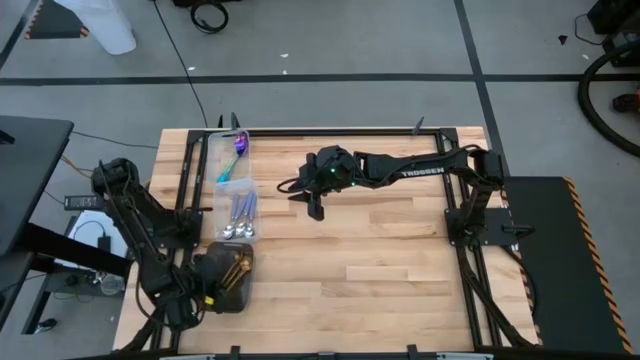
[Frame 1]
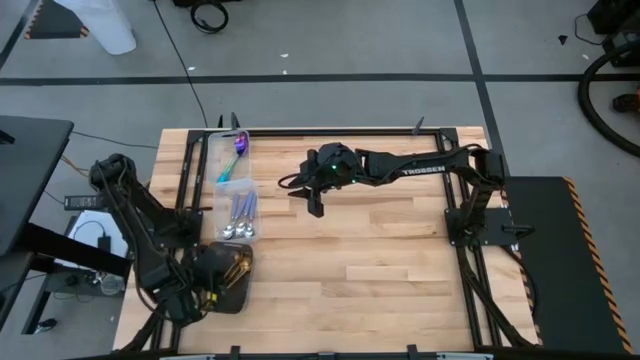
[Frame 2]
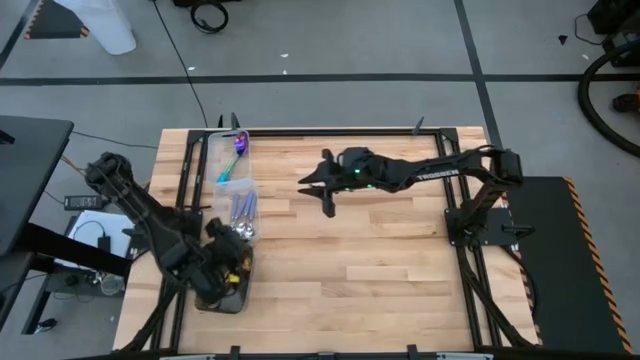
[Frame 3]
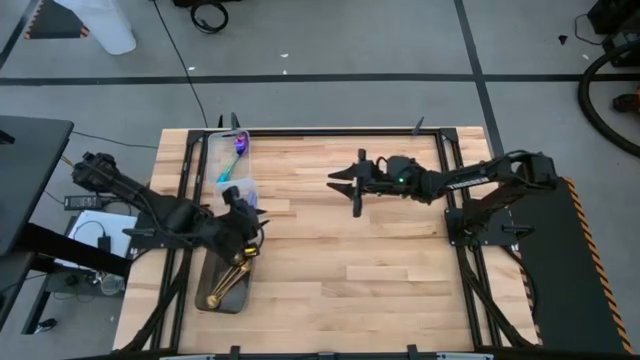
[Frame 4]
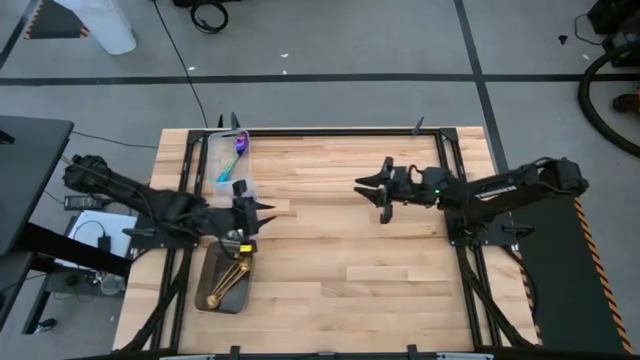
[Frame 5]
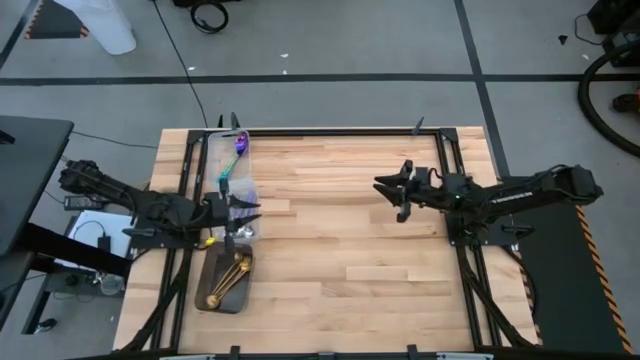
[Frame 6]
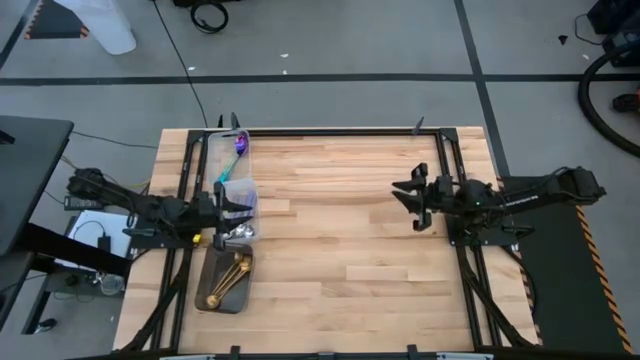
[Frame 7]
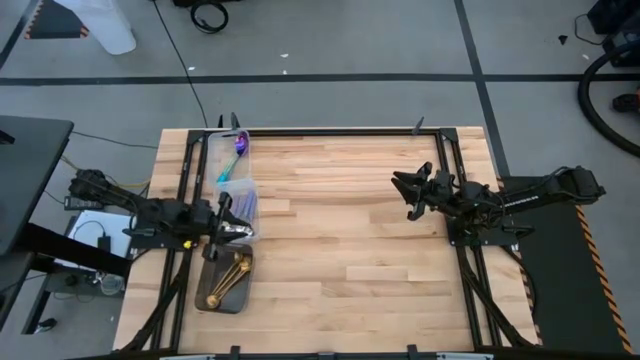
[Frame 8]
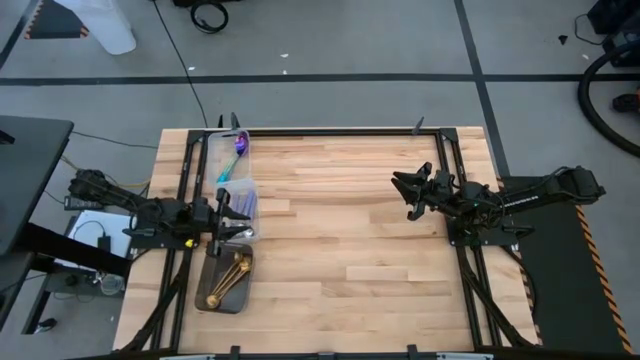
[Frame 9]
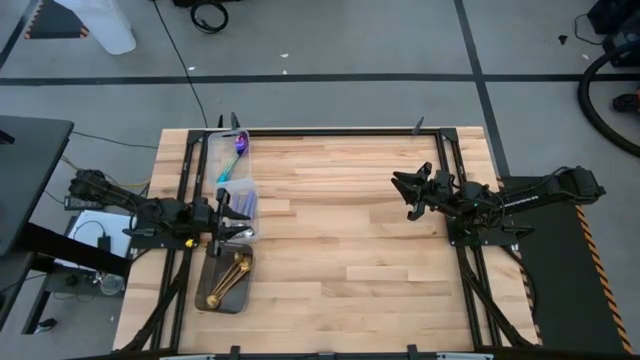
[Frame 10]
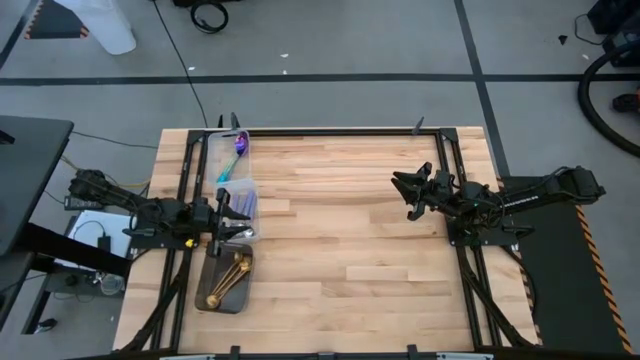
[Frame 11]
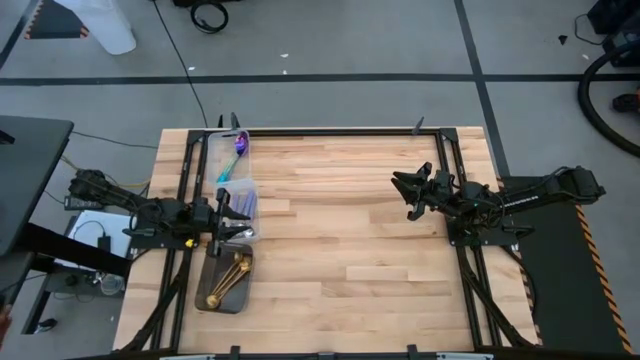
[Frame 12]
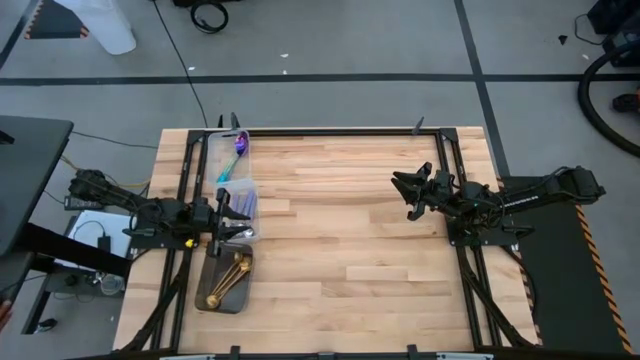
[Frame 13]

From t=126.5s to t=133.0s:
Task: Sort silverware by color (type)
Return to Home Position

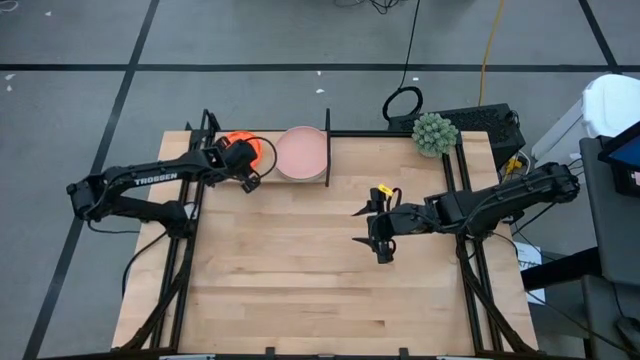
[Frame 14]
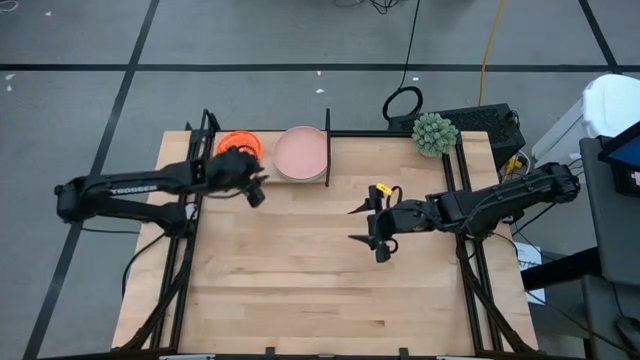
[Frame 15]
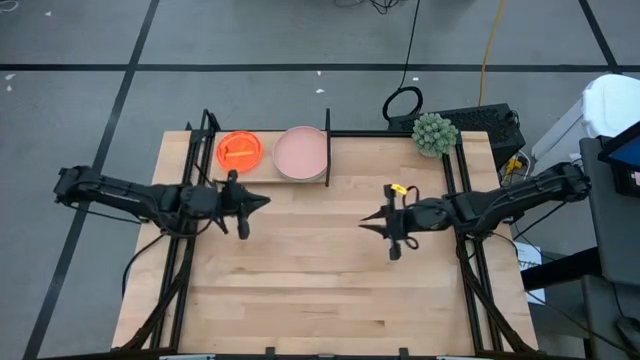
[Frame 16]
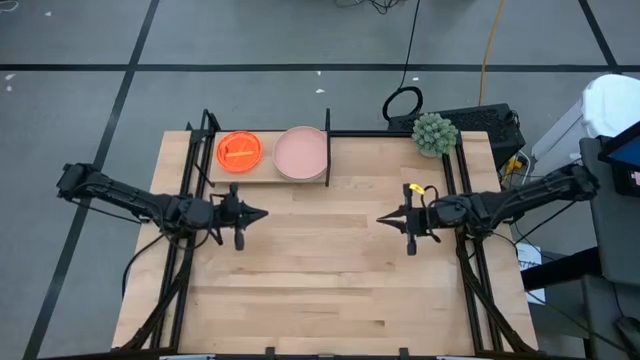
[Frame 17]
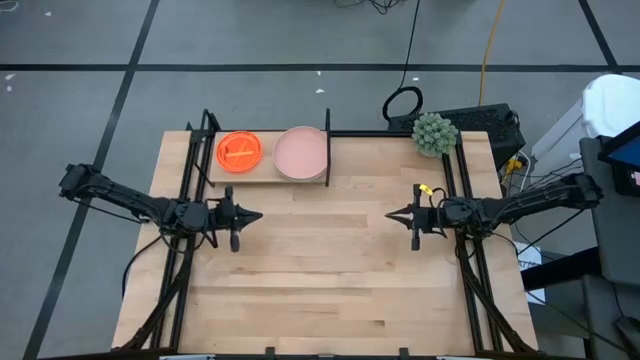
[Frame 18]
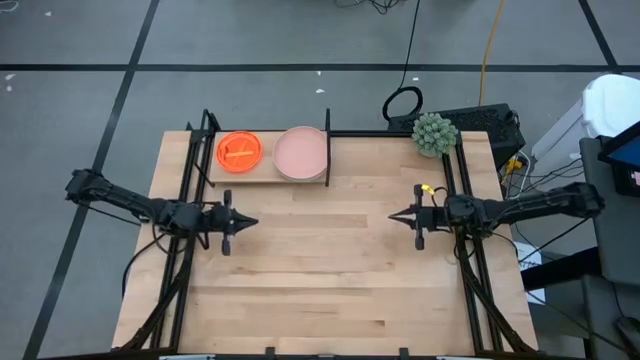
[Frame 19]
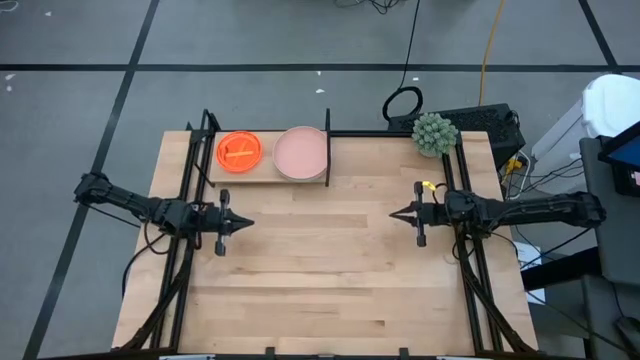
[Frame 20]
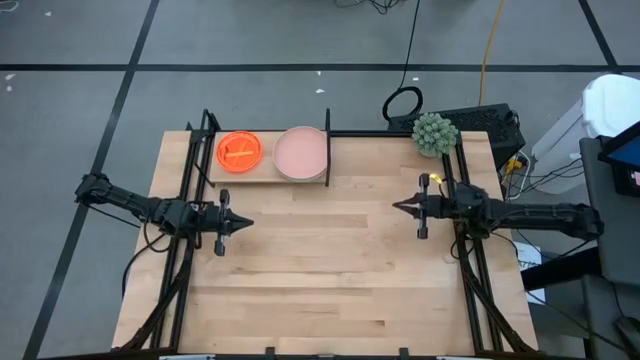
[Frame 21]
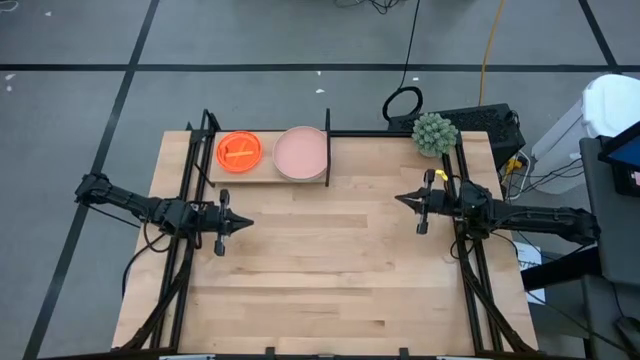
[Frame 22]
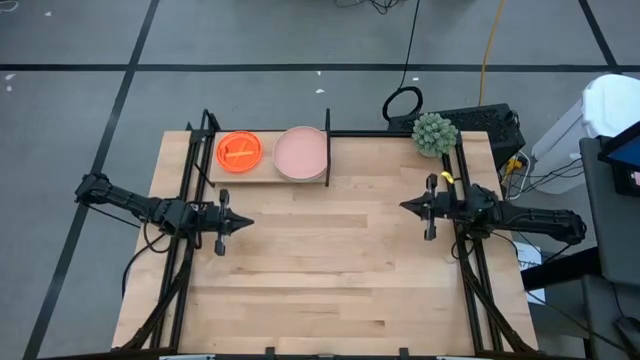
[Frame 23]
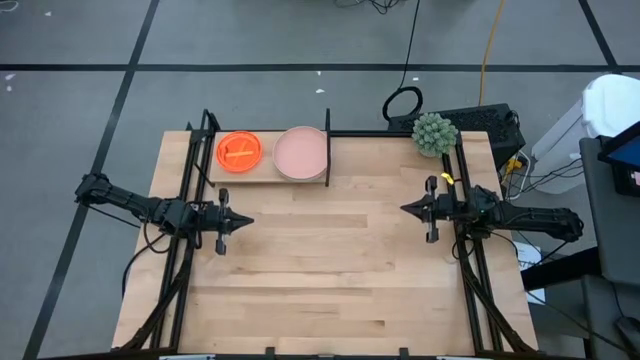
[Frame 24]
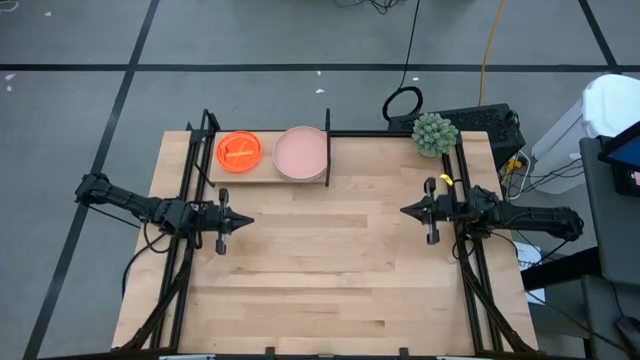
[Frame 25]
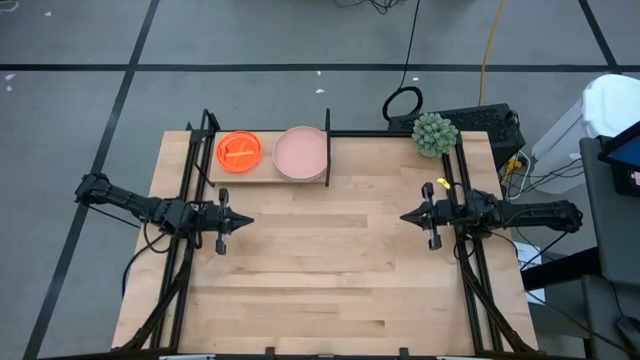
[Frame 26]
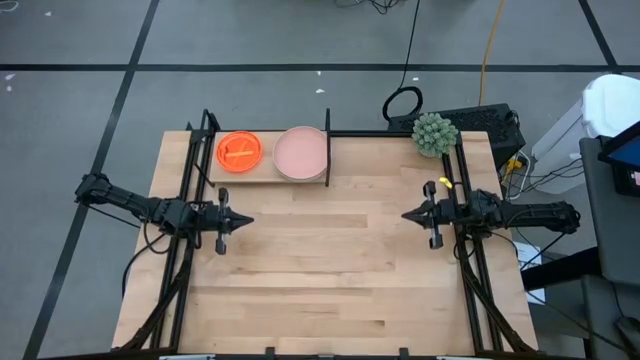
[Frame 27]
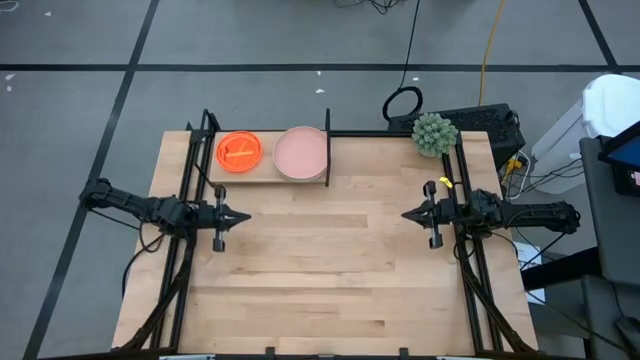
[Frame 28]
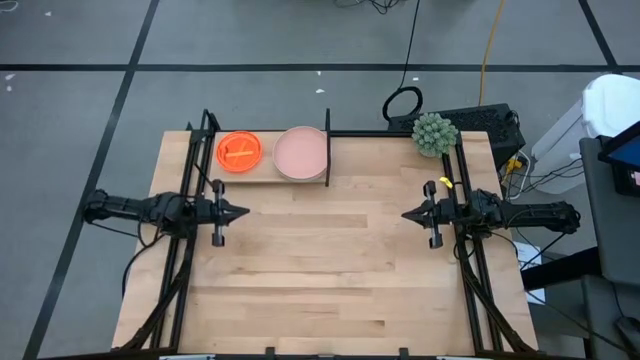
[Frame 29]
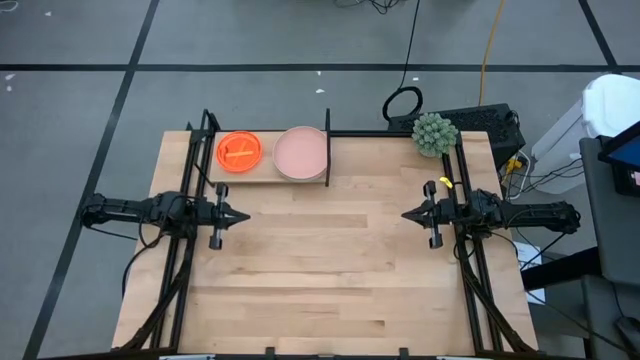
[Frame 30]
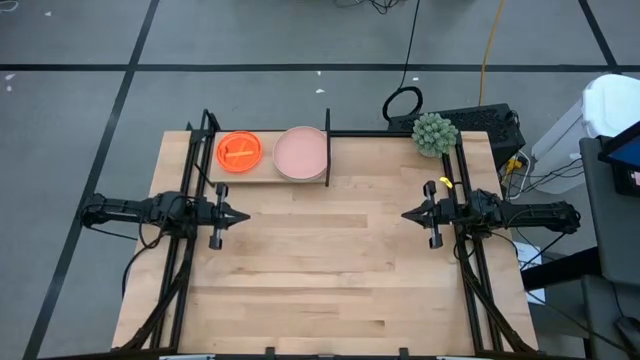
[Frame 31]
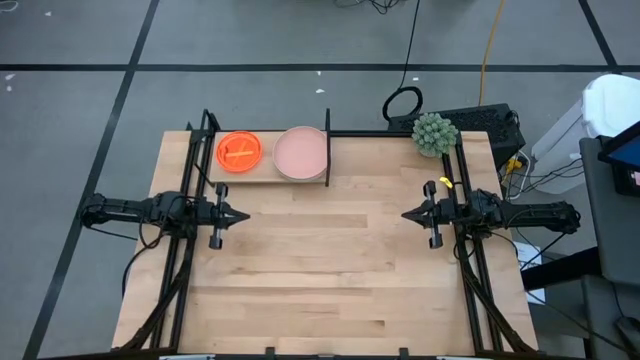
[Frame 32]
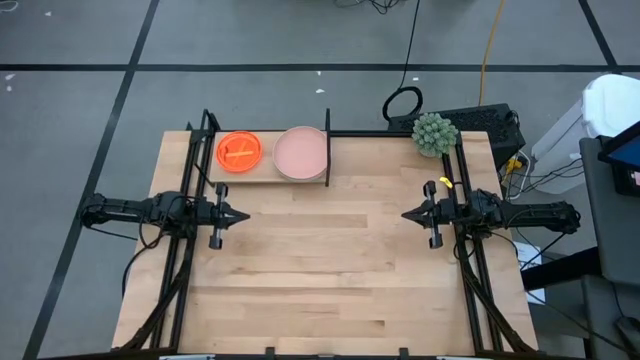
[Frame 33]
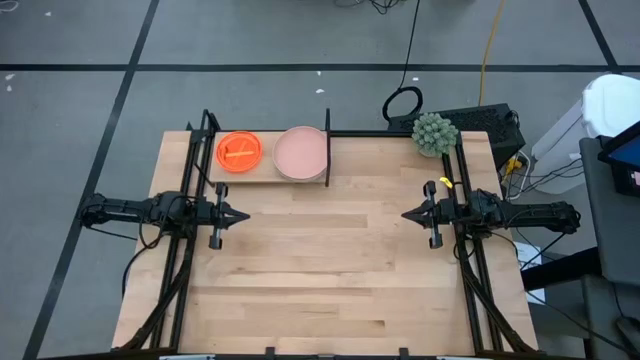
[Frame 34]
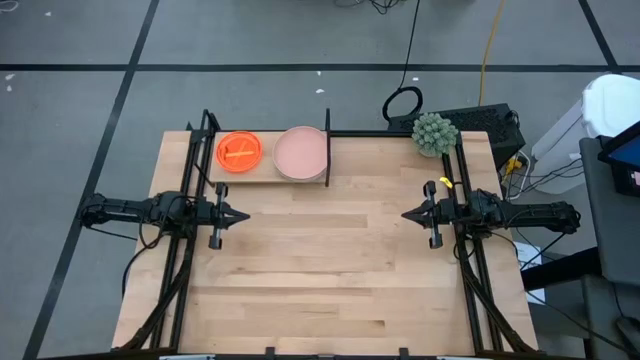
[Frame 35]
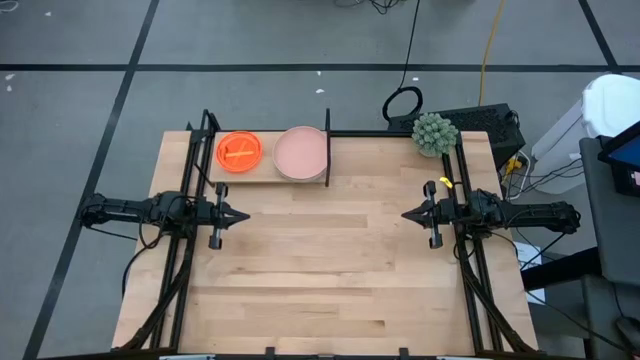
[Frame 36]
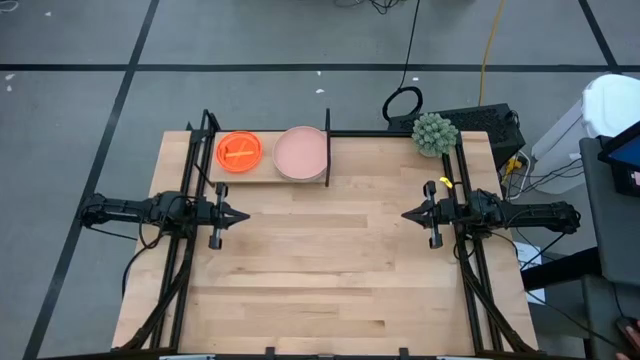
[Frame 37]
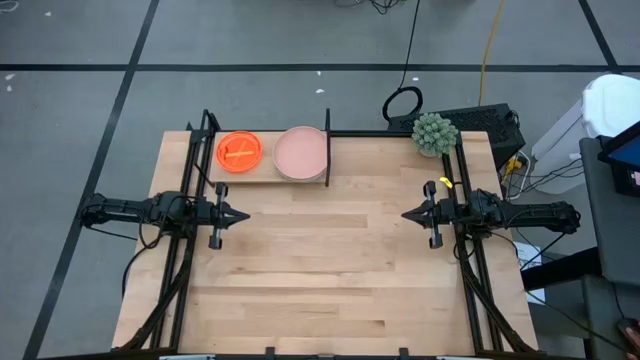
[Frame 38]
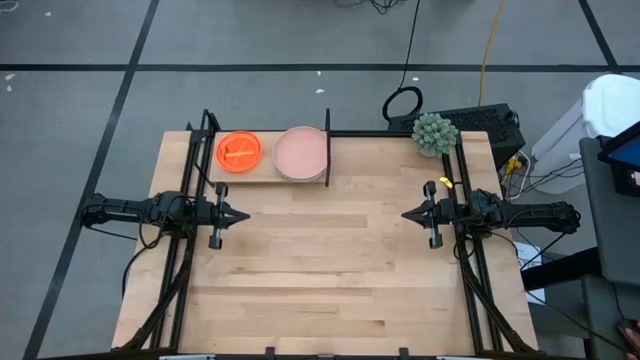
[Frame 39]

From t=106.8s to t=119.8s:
Task: Place and stack plates onto a shelf
Return to Home Position
